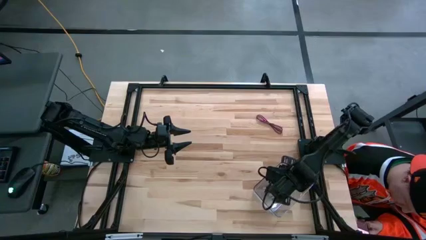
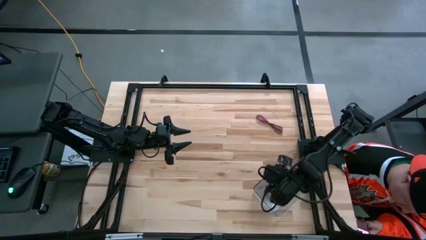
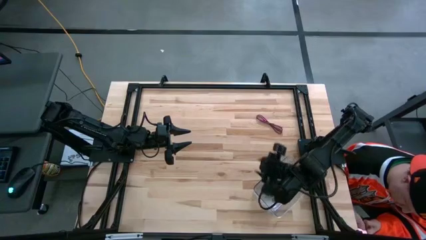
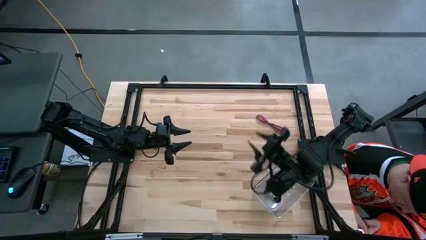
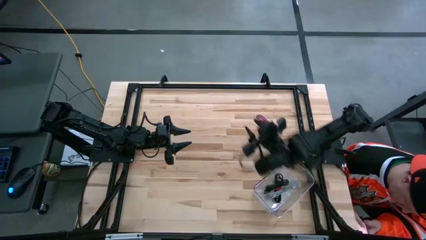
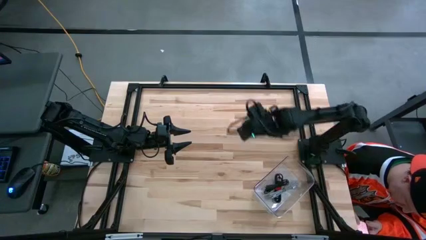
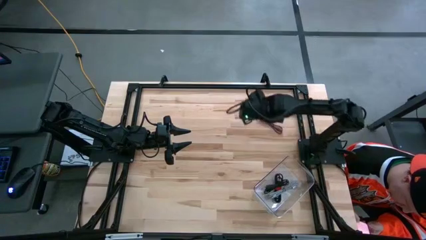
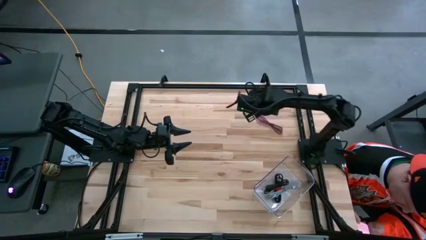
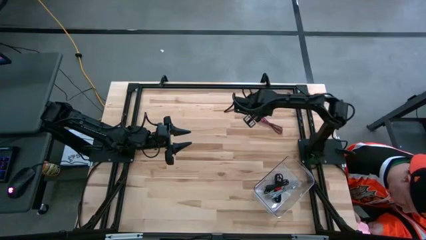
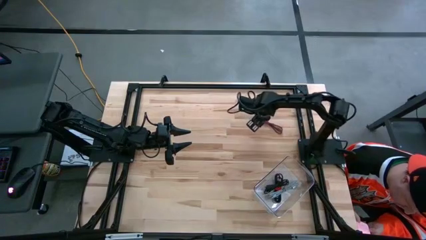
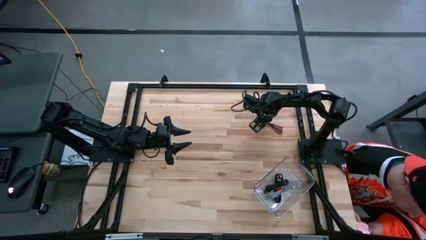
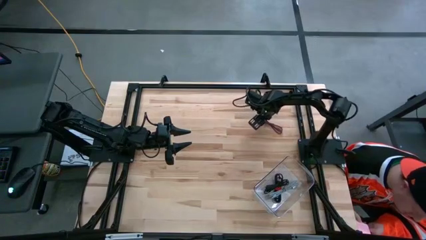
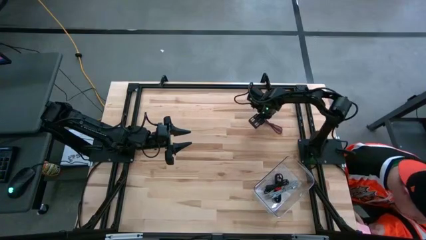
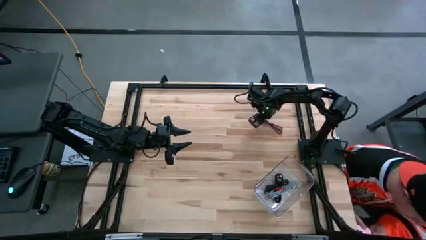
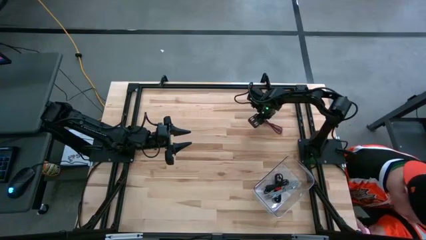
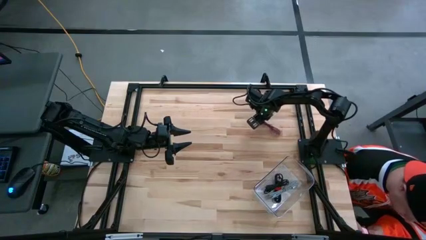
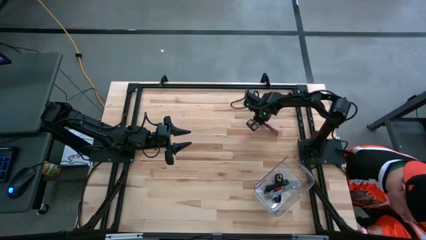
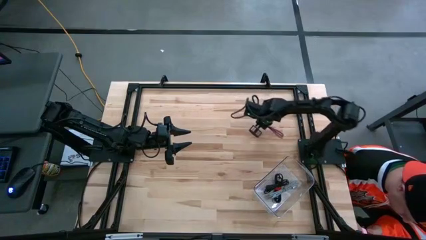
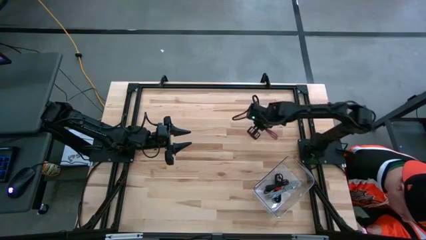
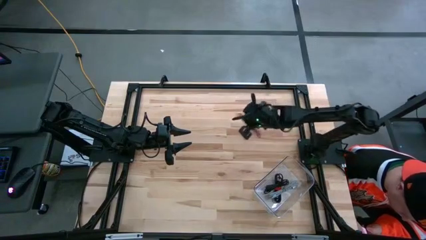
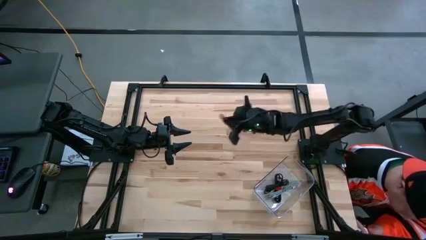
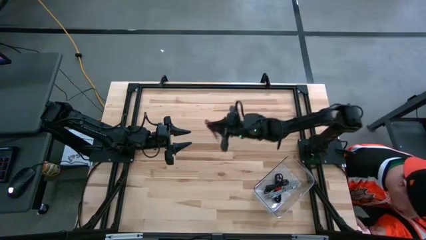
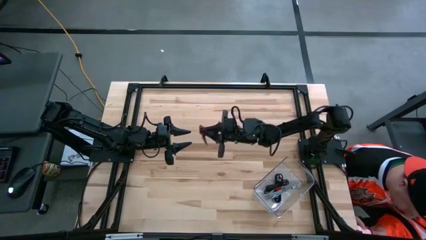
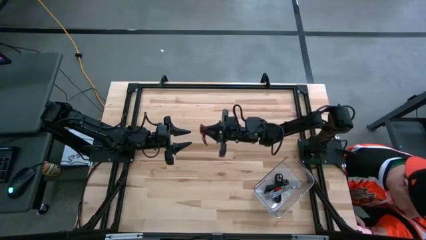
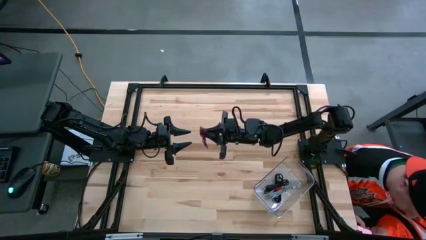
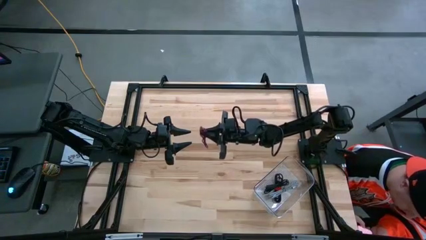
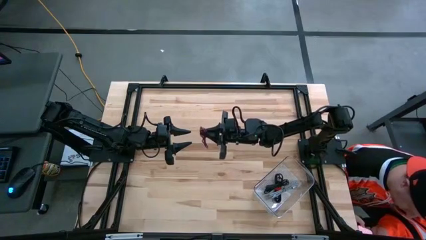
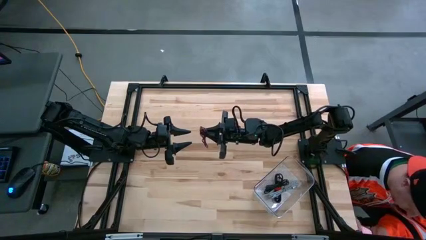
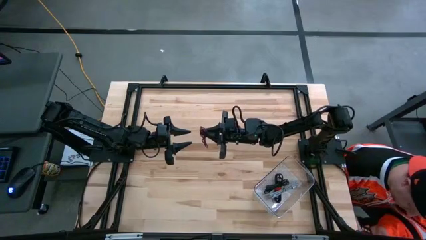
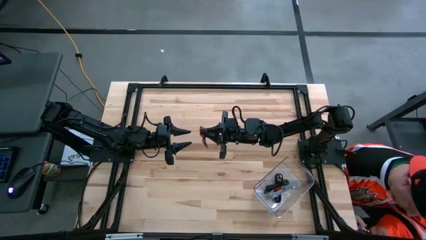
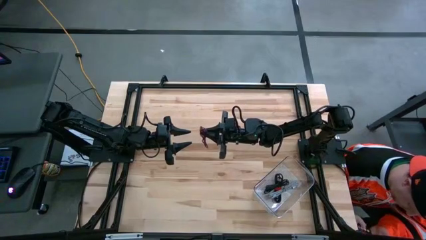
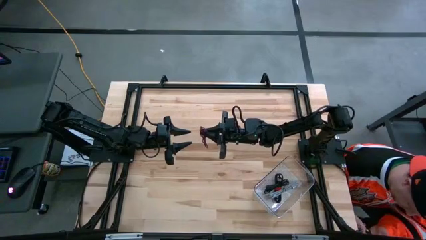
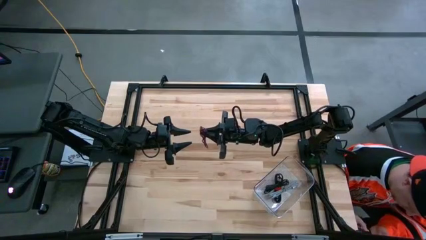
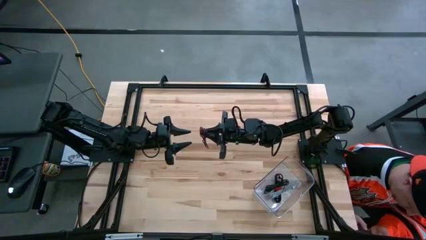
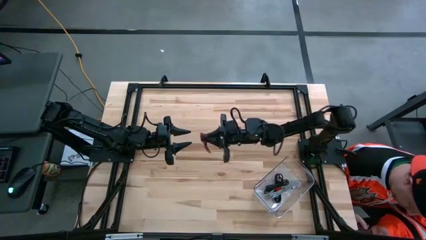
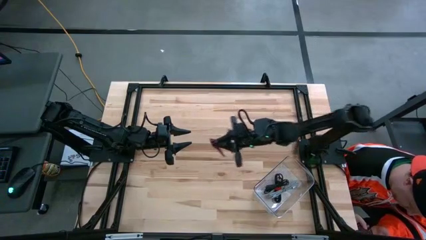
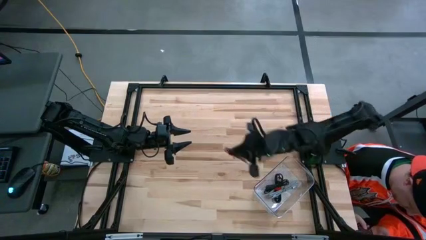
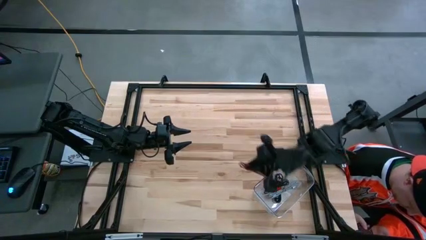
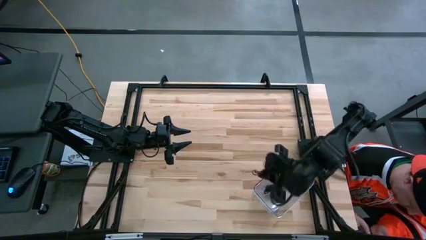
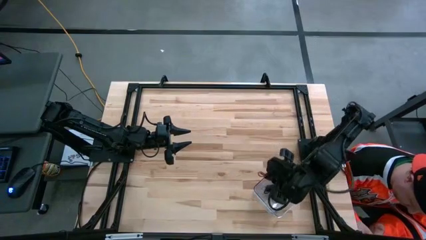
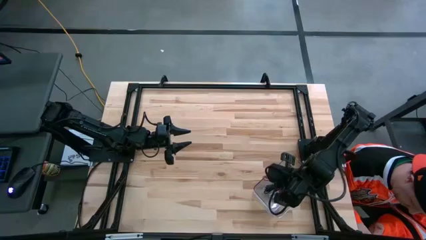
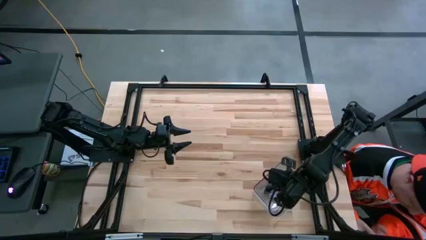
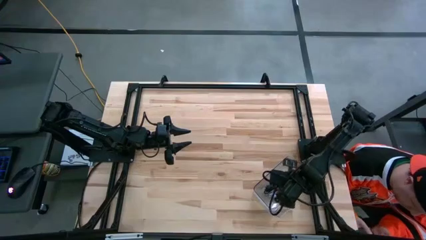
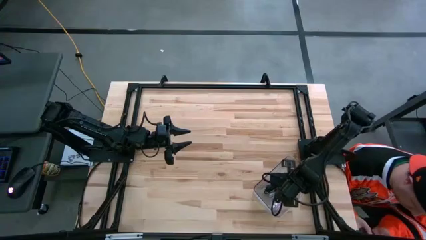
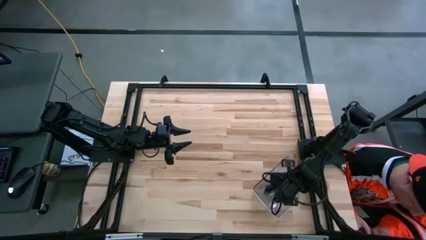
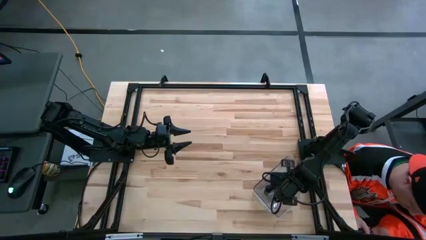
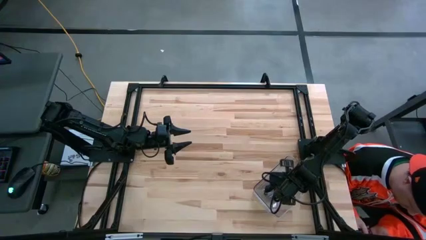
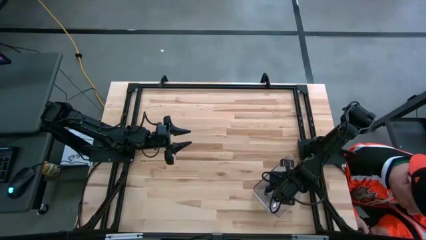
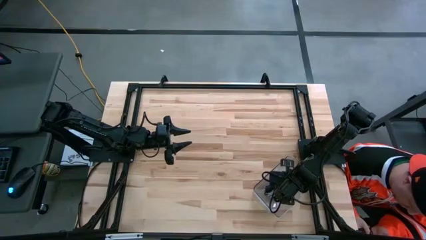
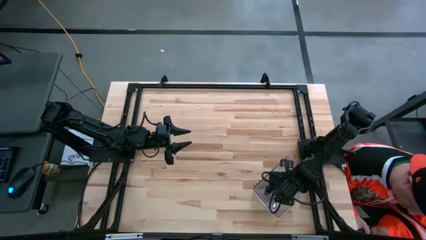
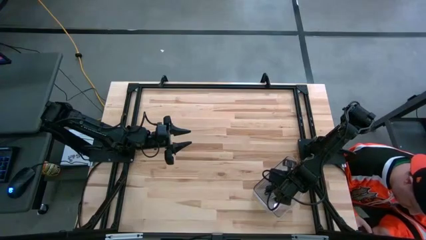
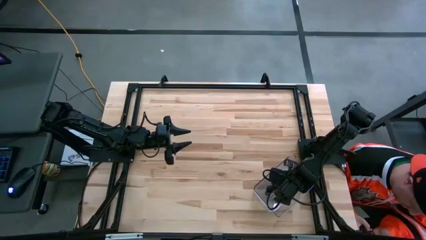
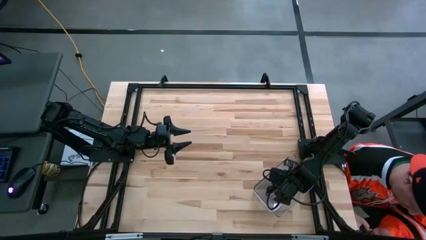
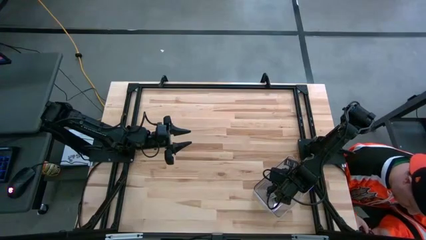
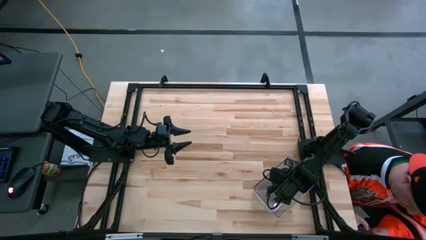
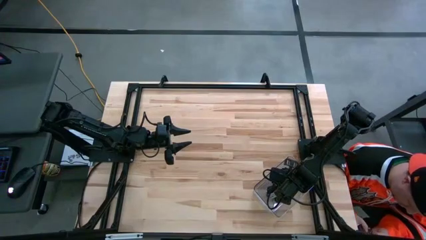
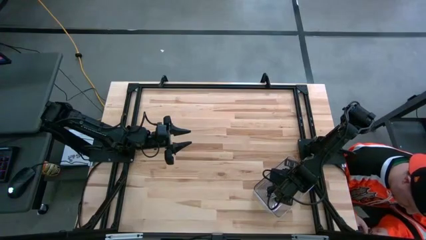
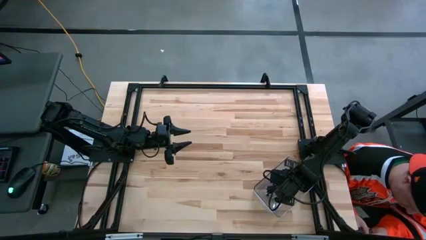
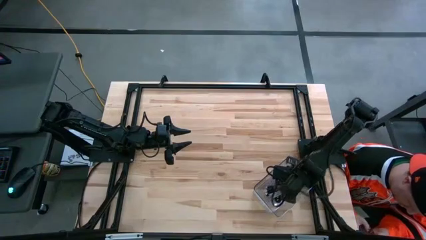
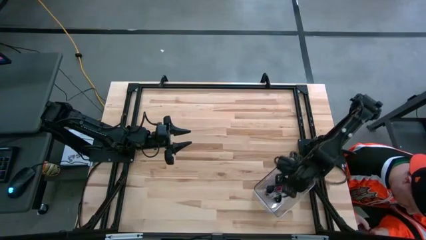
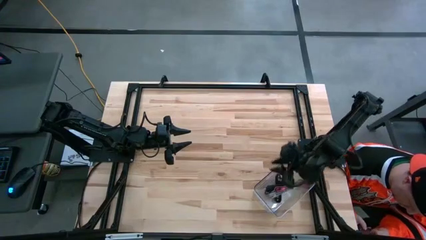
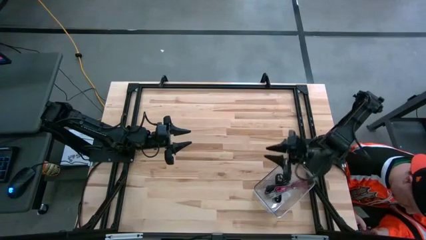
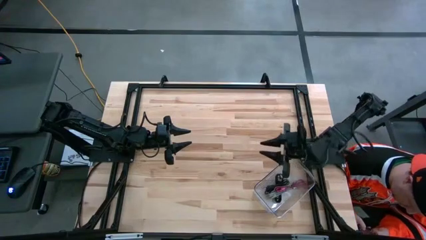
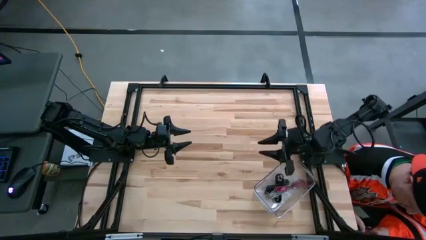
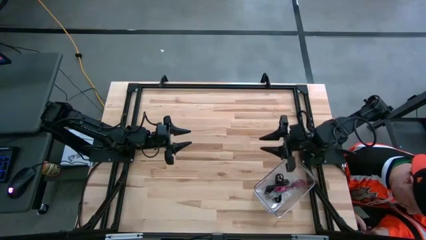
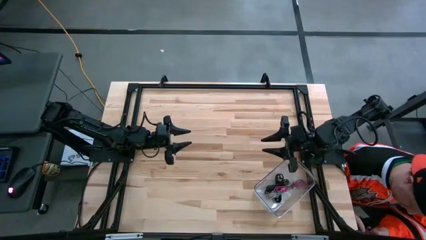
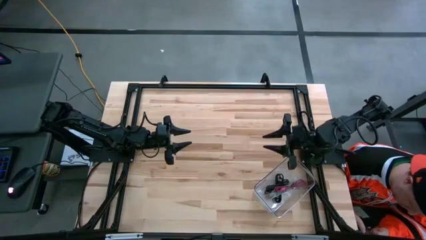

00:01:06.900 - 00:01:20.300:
Task: Pick and place USB-C Cables
Return to Home Position
